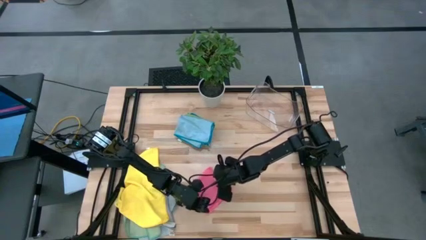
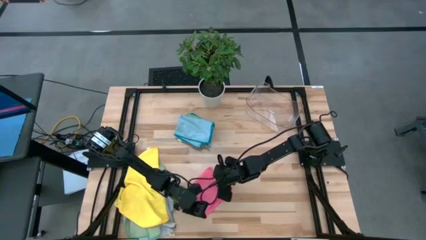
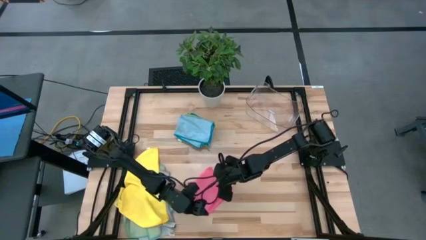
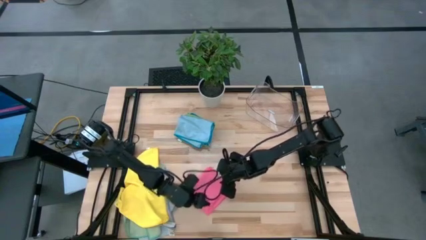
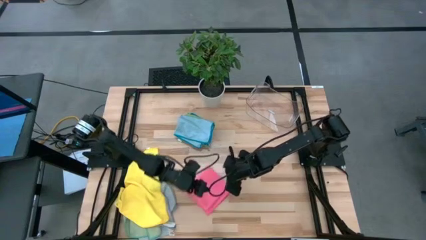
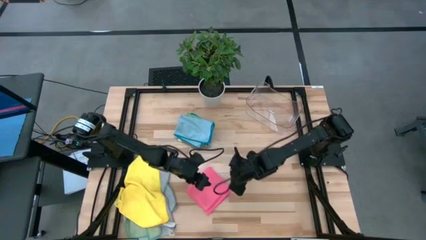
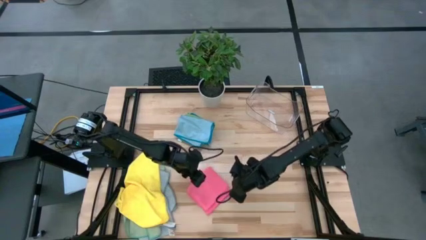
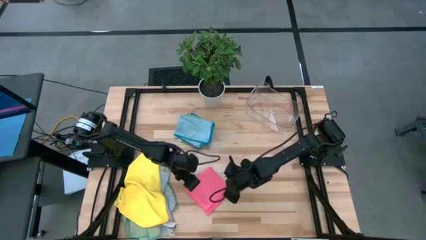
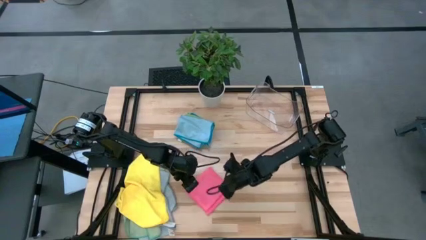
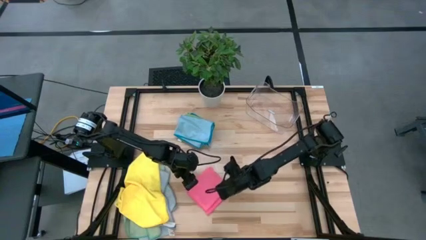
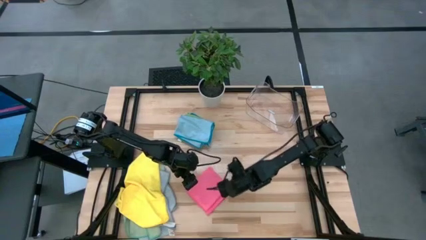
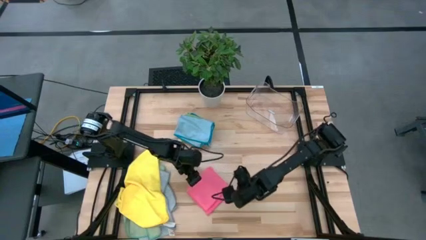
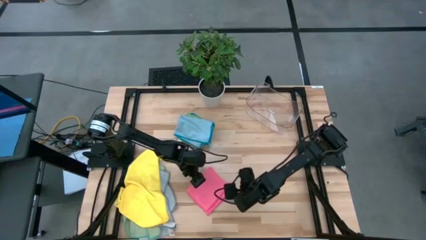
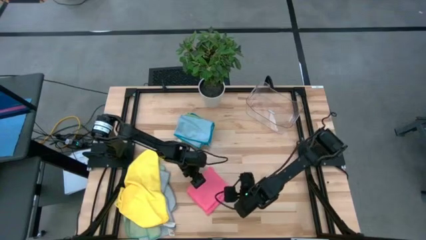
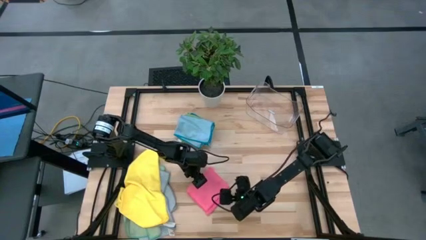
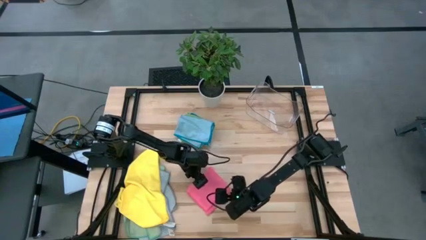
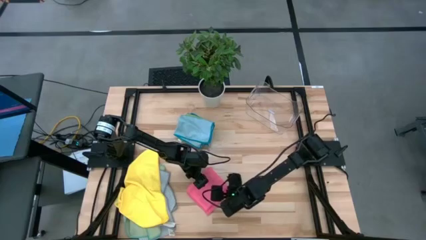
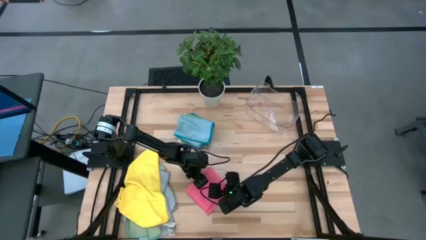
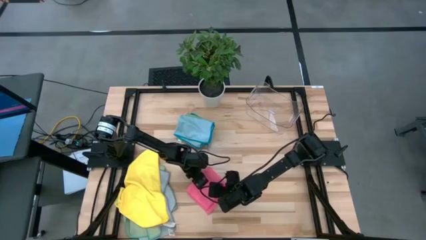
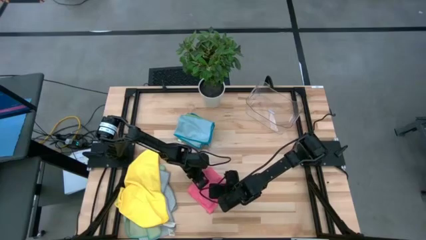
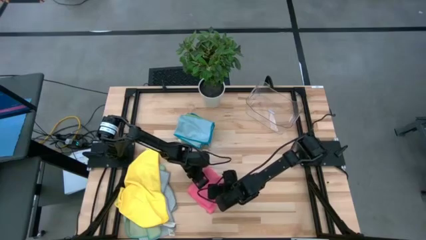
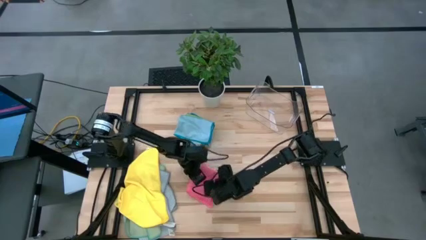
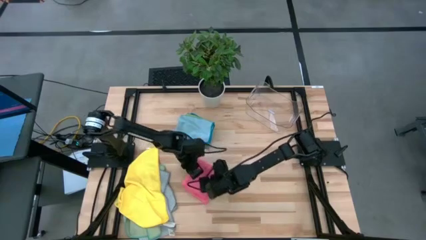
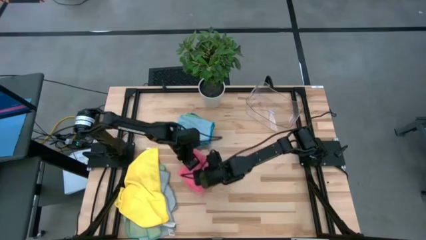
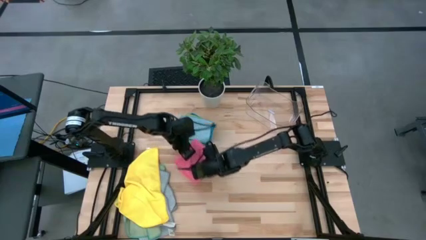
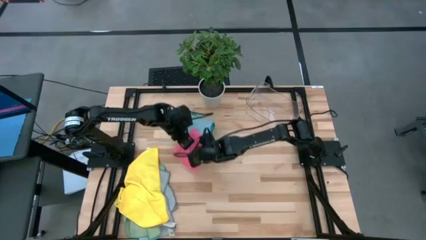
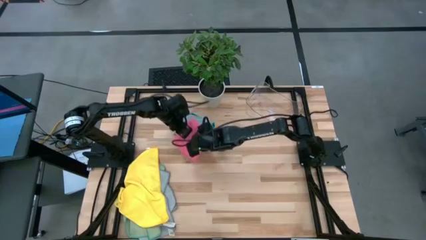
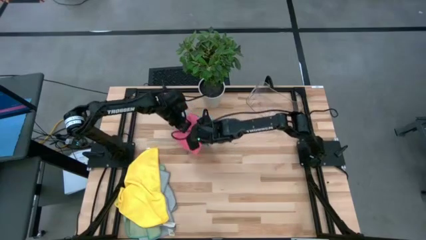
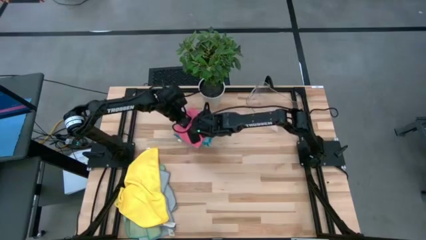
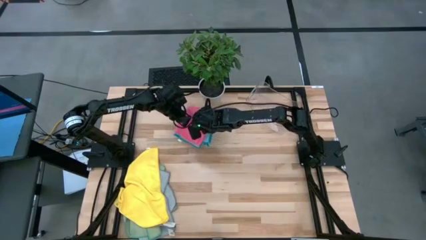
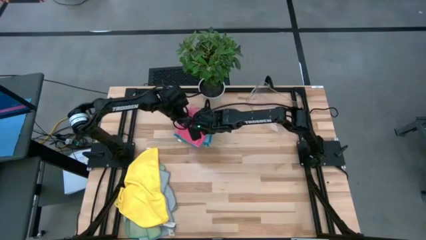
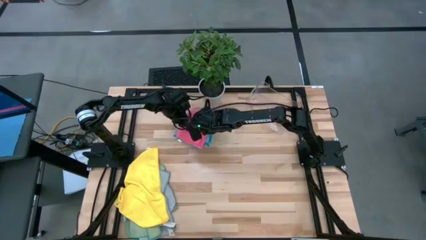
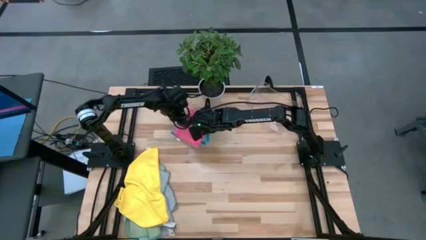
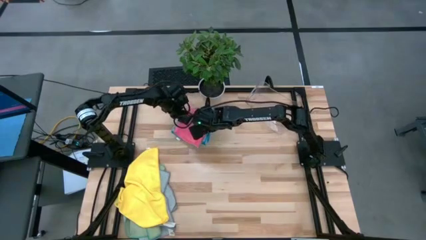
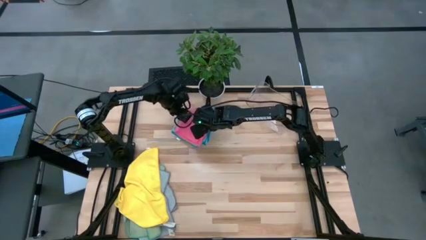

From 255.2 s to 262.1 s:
Task: Fold microfiber towels
Stack the pink microfiber towel on the light blue microfiber towel

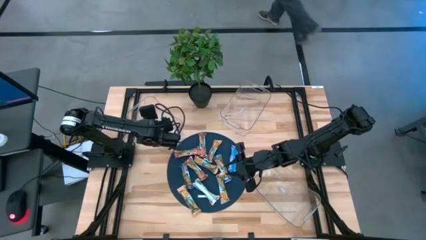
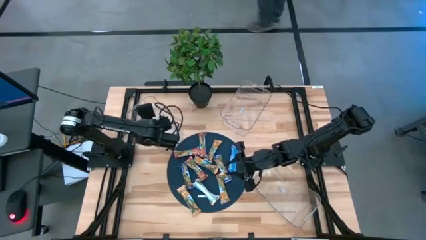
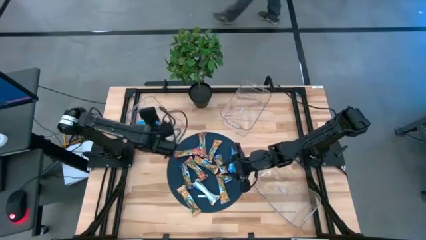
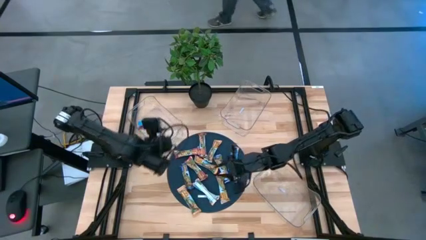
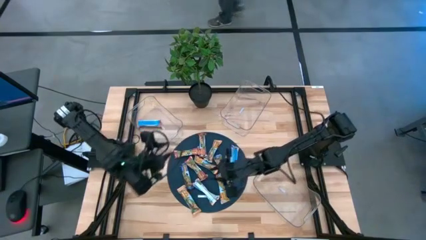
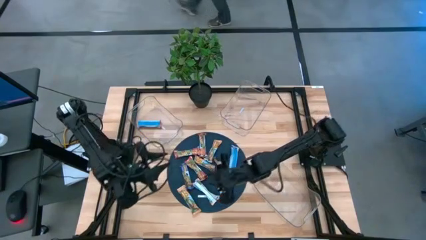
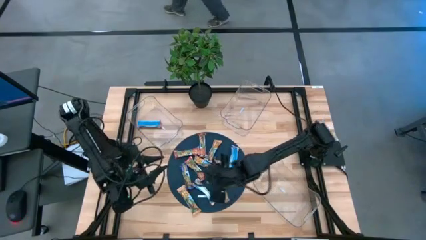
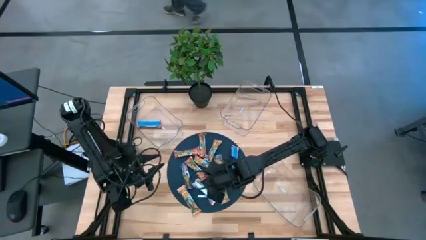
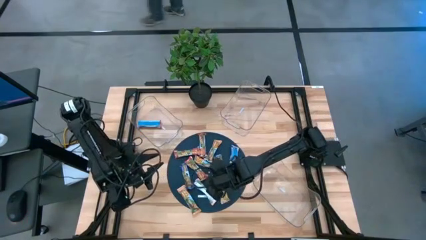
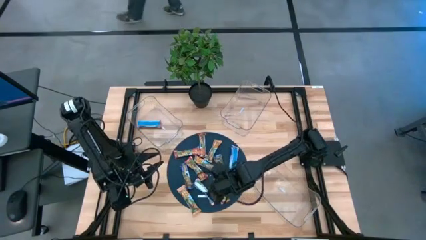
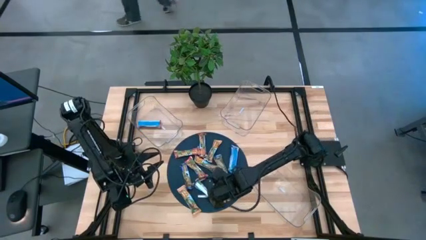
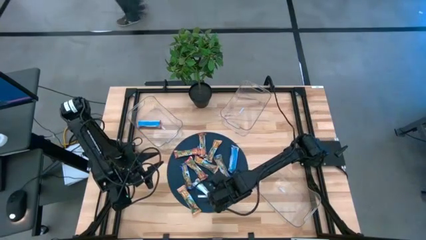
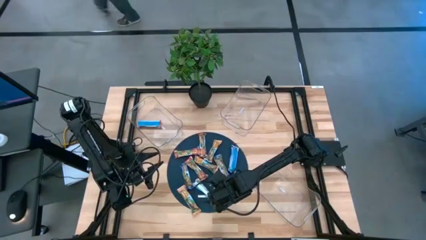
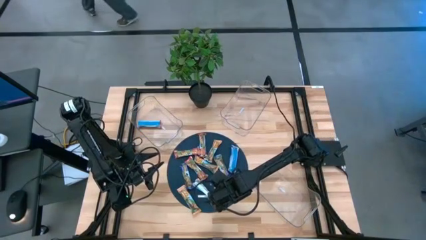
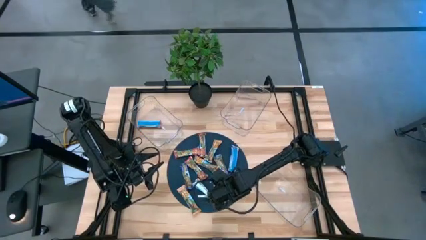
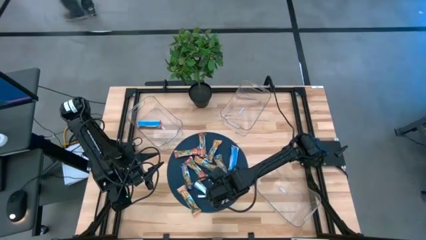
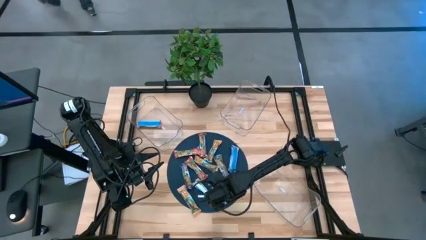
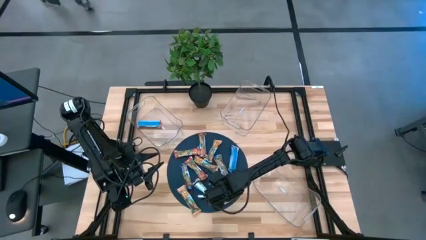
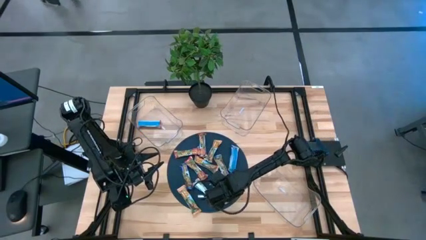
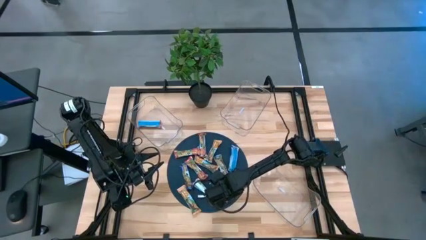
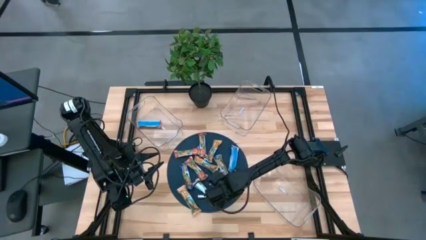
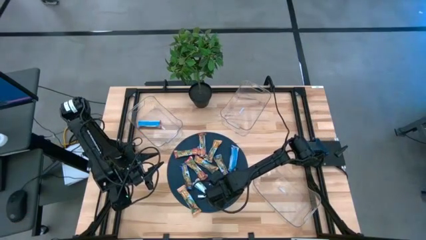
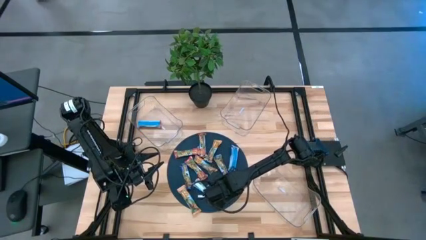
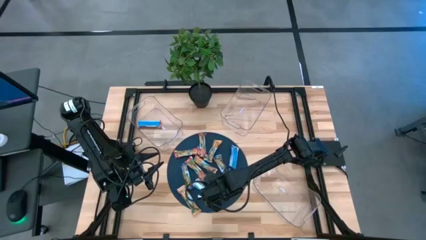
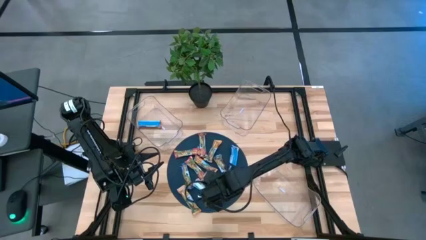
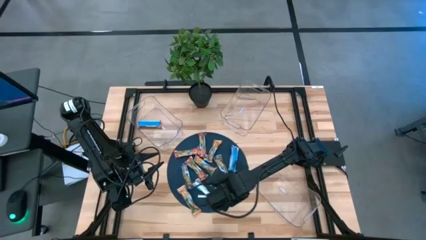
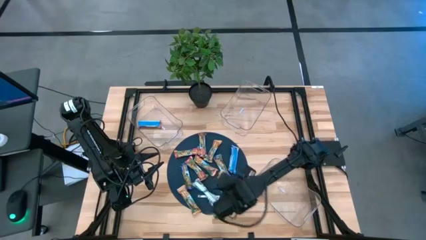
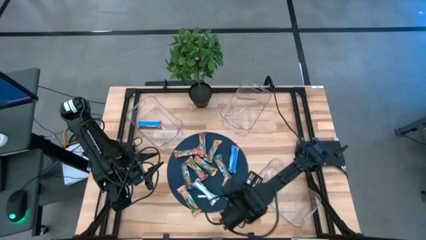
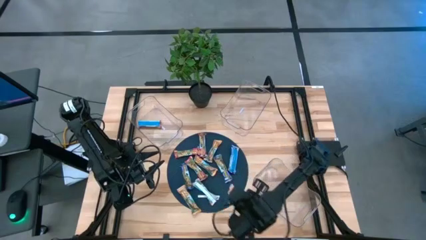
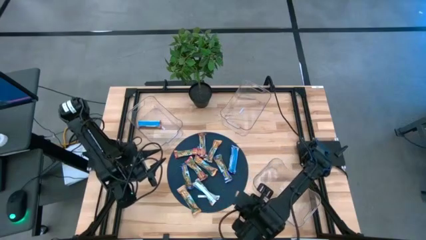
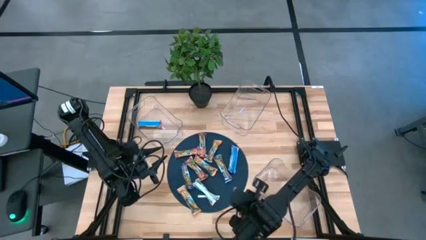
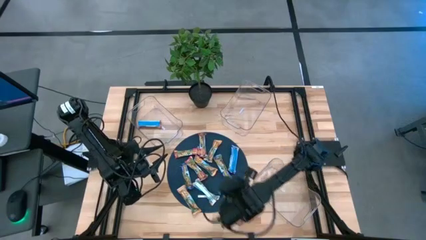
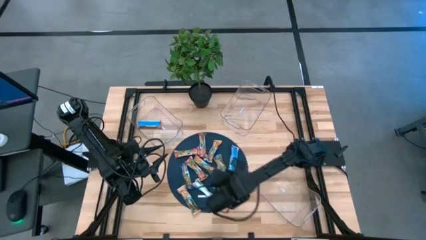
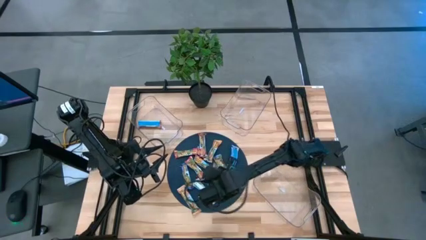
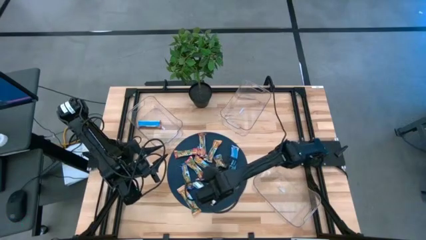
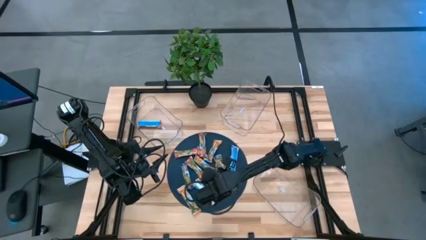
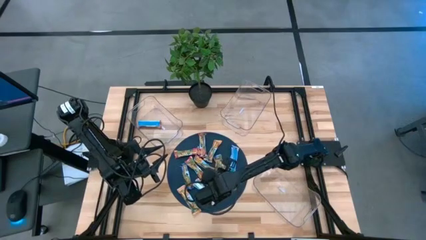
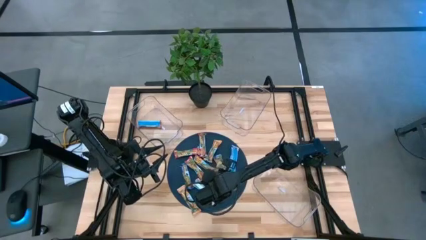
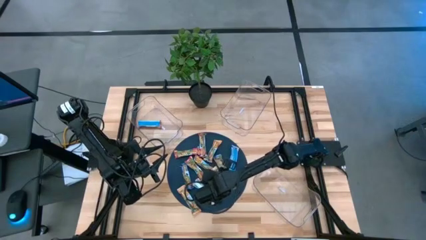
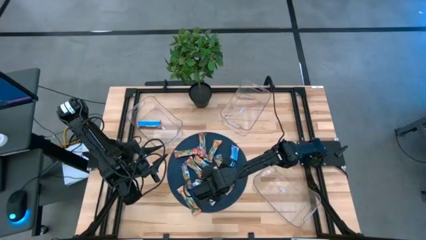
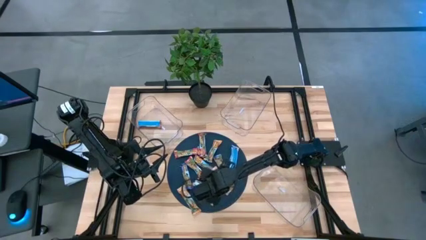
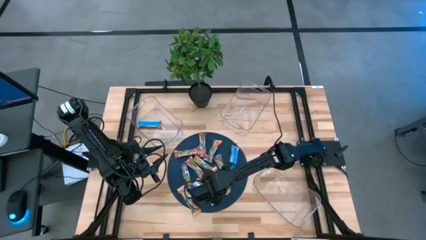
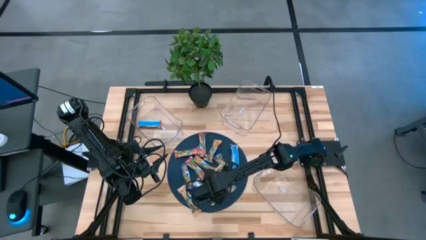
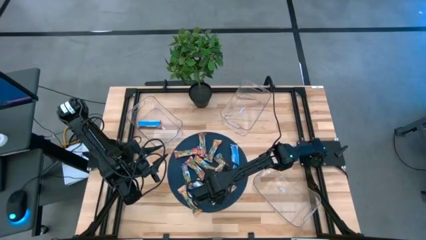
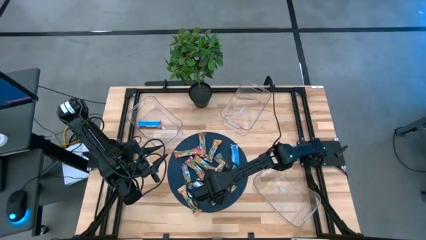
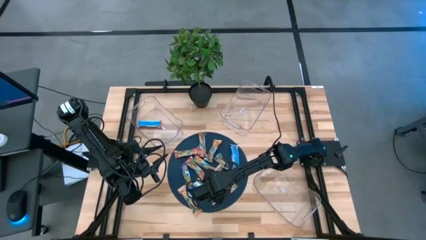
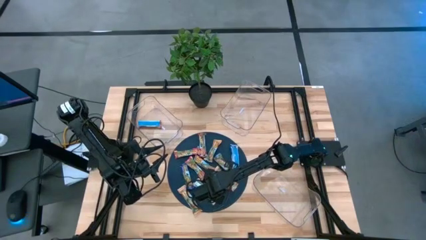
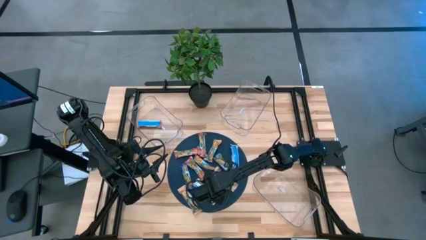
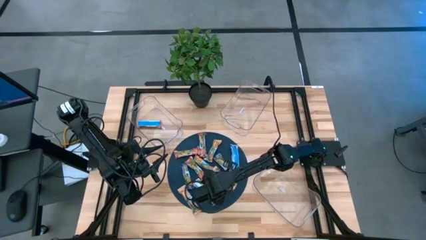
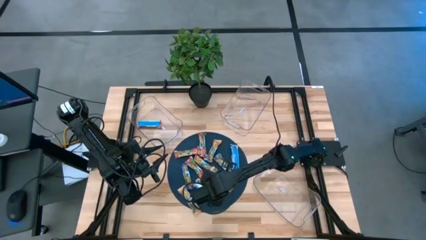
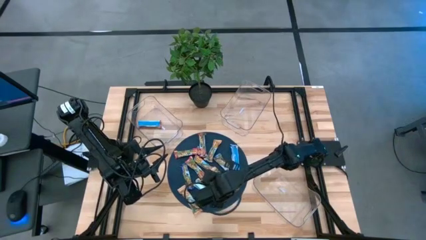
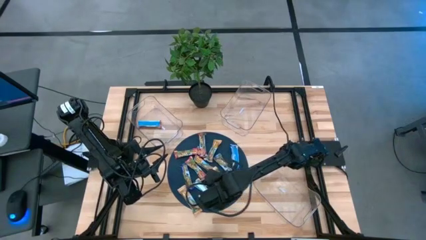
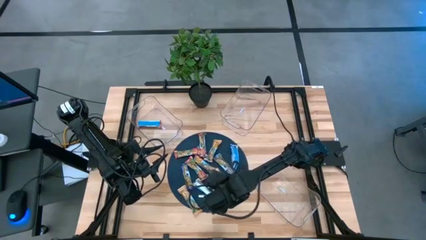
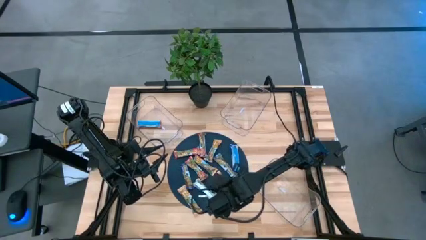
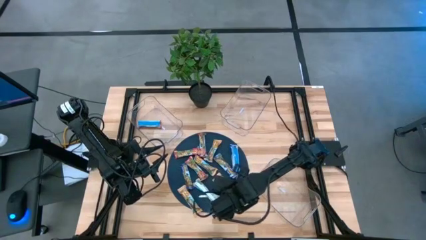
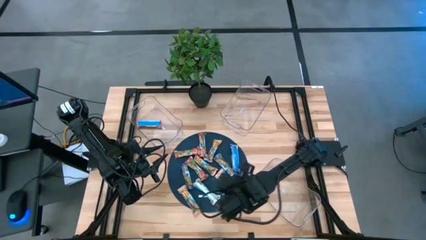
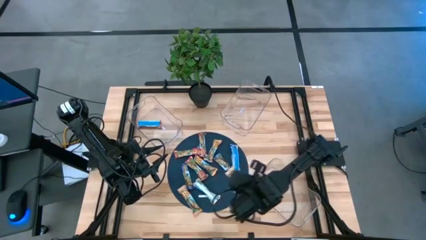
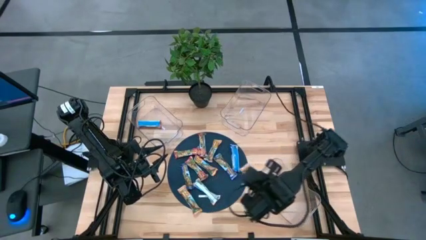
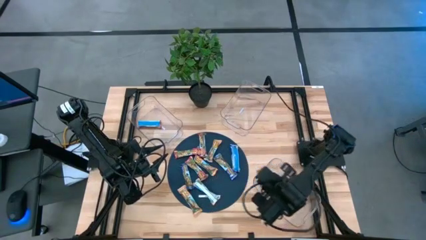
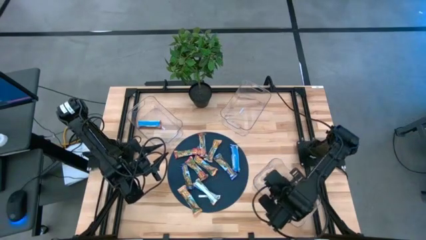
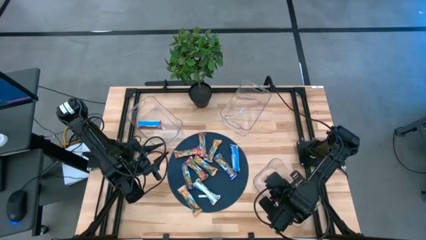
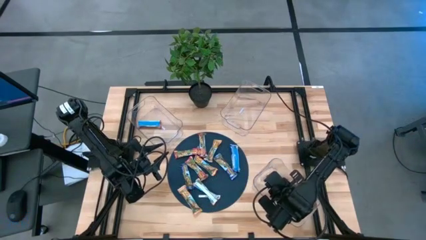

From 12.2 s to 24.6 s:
Task: Pick and place Granola Bars by type
Put the yellow granola bar into the bottom transparent bin
